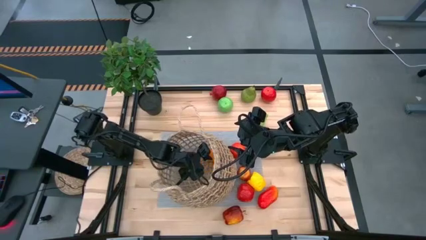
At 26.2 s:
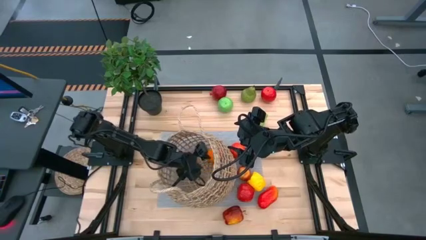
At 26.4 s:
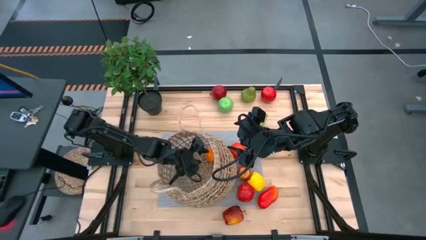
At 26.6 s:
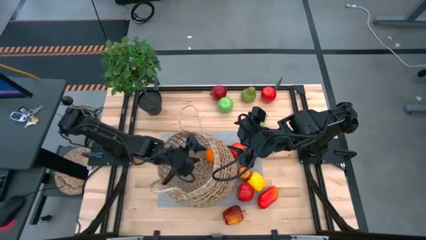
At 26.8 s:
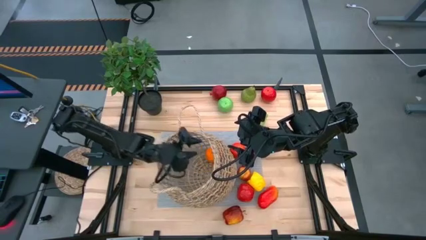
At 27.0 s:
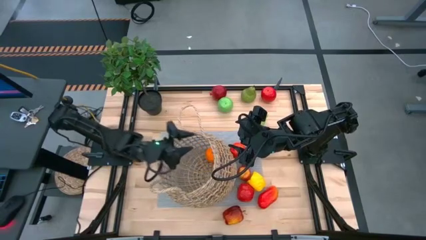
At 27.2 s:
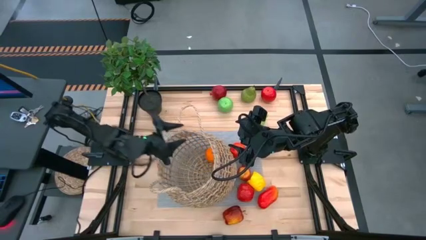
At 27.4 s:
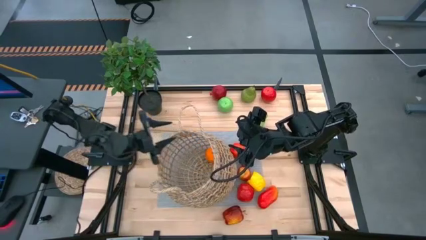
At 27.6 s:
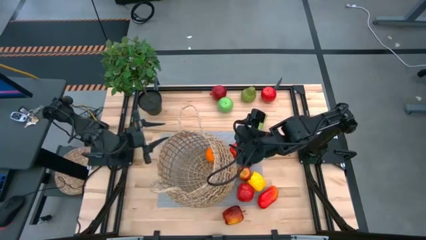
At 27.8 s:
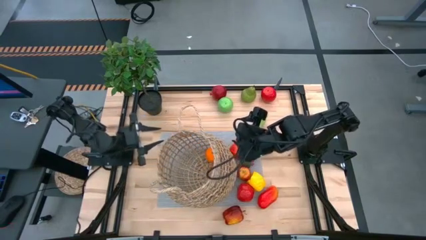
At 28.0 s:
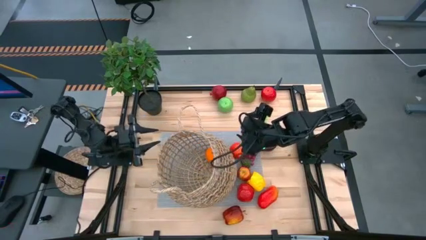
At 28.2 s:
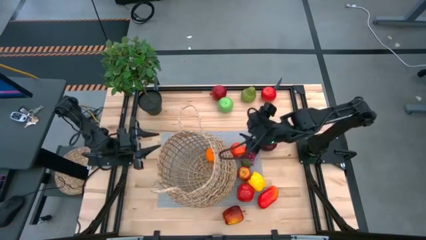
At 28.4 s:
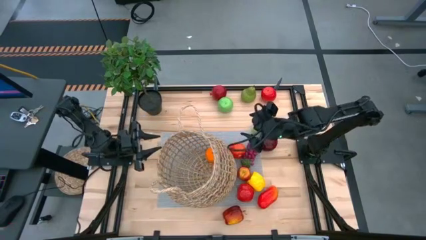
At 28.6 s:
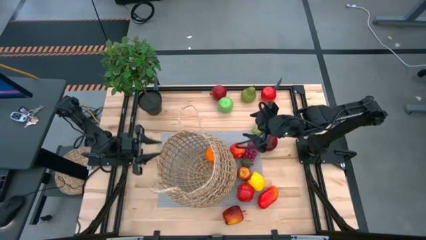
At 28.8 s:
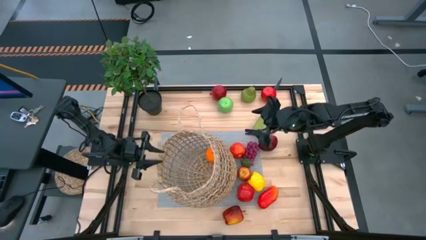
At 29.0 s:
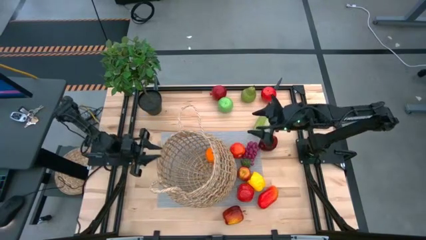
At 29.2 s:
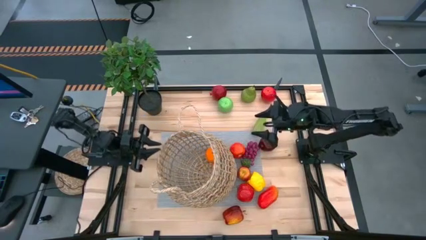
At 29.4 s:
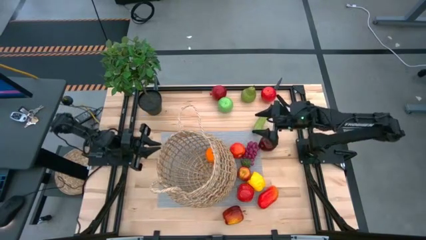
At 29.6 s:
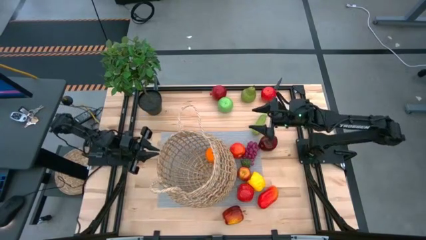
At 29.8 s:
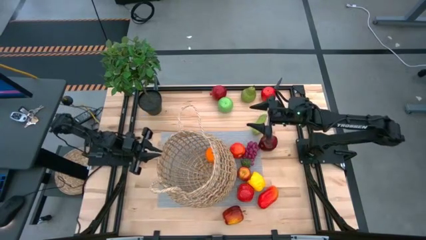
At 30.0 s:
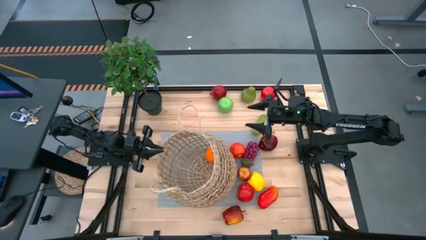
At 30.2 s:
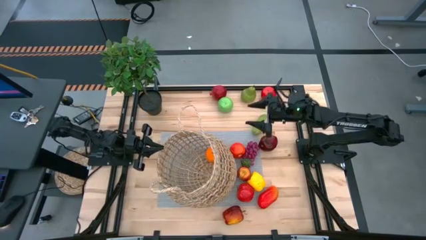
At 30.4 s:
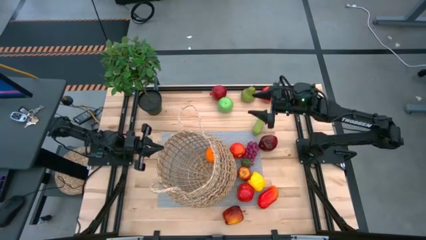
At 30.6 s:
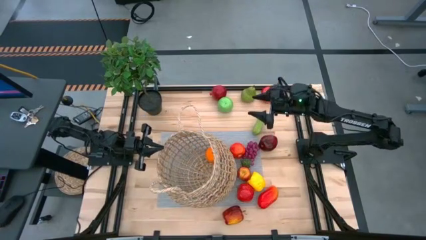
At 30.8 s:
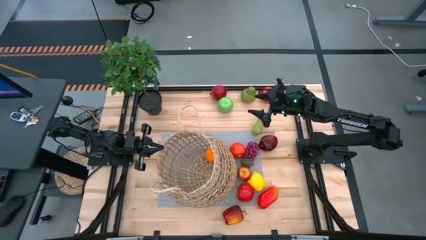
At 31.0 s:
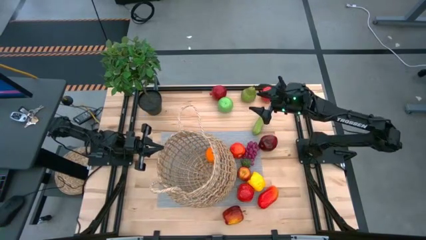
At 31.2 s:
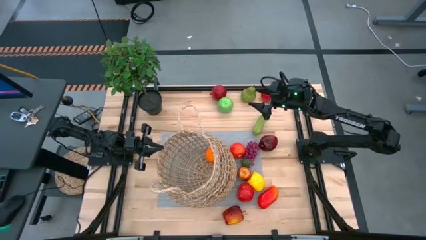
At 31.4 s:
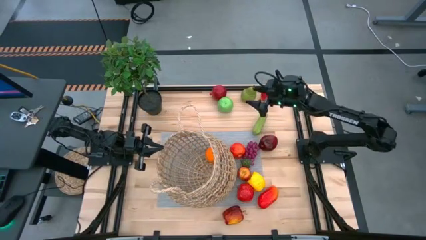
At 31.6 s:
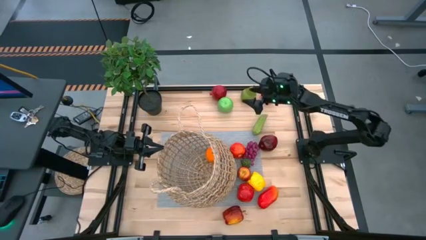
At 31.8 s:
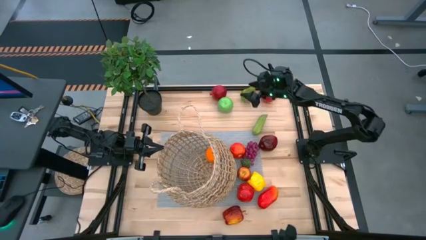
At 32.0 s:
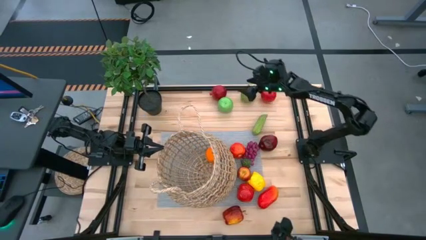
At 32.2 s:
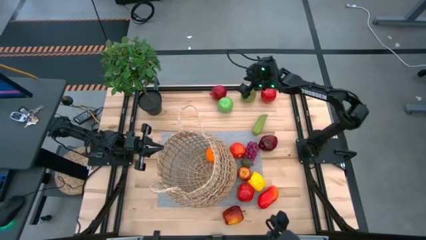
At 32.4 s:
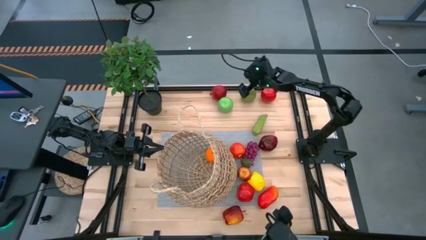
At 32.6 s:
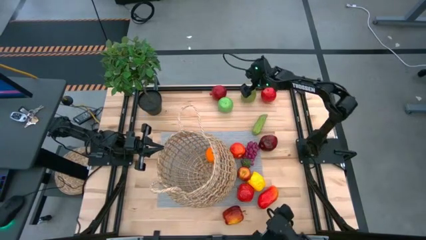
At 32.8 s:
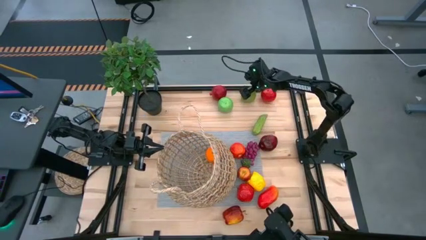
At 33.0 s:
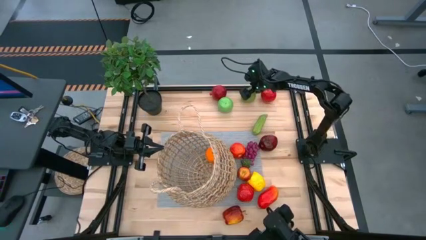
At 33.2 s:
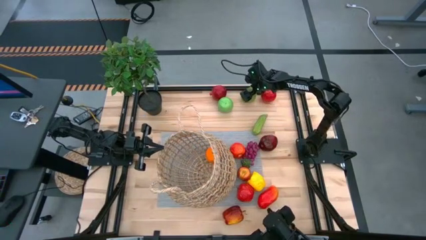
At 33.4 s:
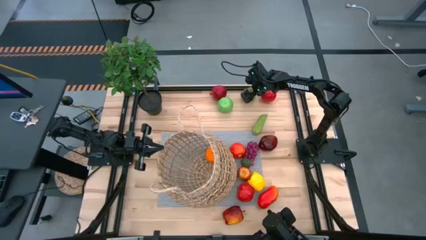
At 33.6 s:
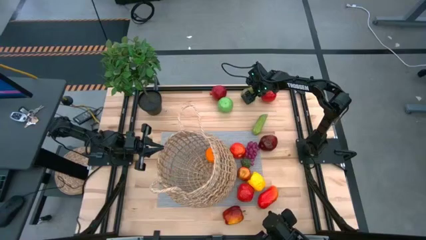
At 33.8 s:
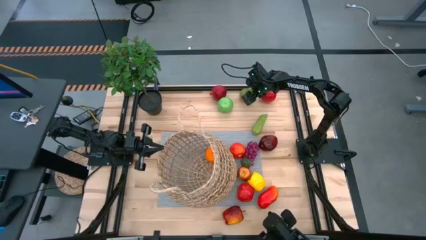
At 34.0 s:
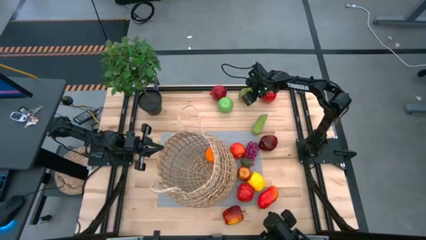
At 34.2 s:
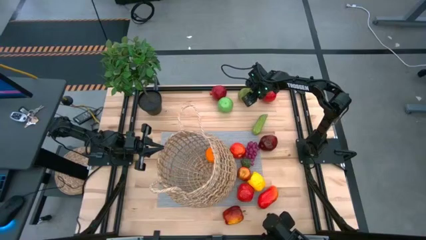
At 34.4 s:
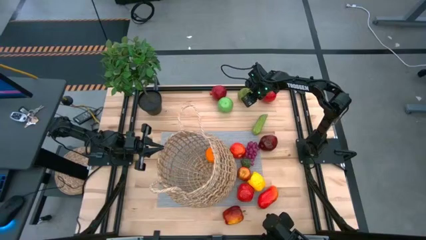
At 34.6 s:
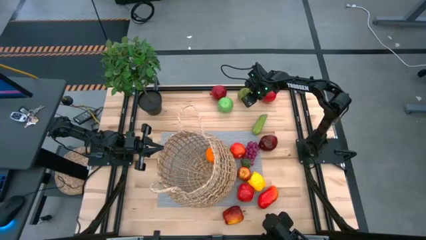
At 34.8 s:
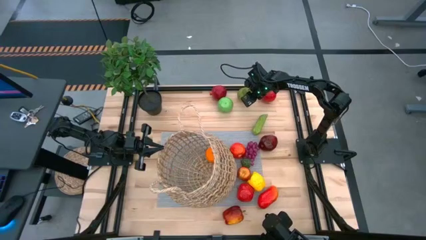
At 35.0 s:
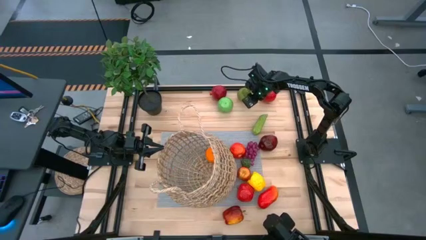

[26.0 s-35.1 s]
Task: Build produce basket
Put the pear into the brown basket

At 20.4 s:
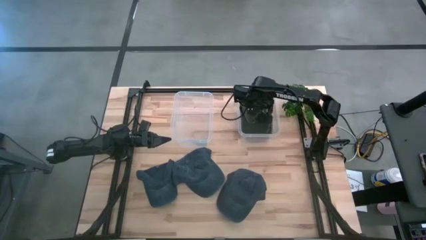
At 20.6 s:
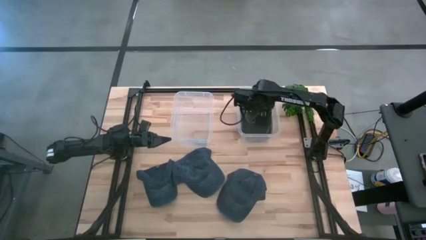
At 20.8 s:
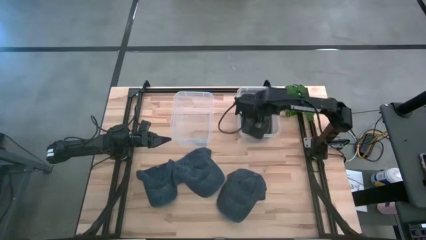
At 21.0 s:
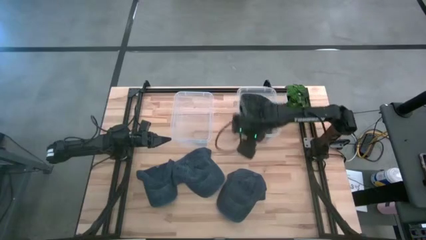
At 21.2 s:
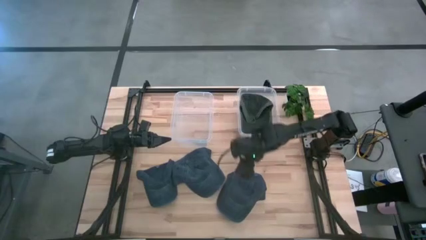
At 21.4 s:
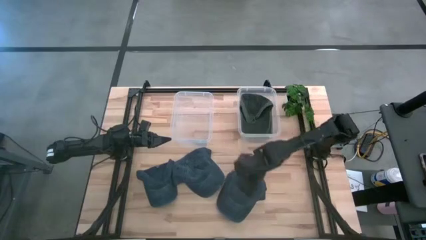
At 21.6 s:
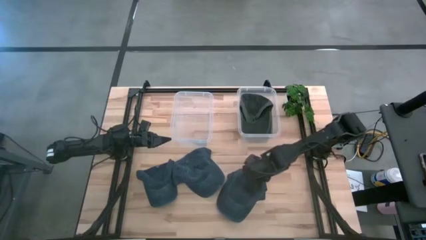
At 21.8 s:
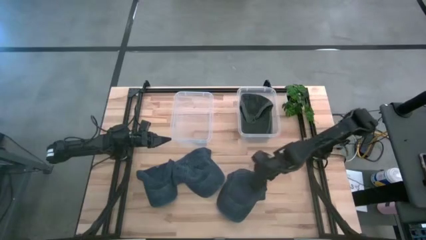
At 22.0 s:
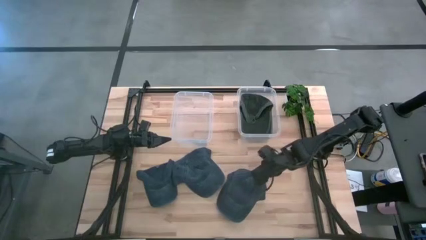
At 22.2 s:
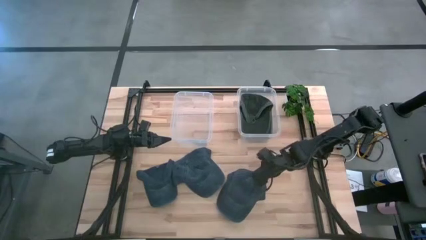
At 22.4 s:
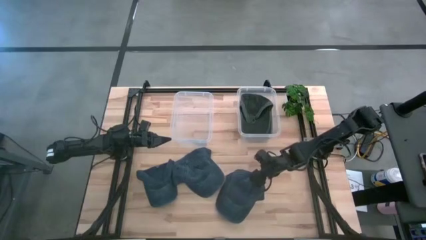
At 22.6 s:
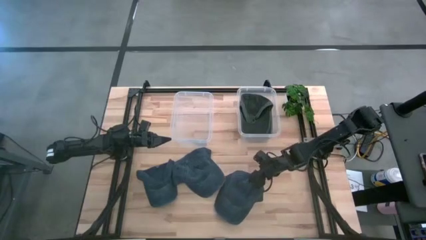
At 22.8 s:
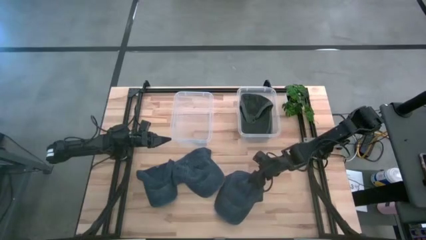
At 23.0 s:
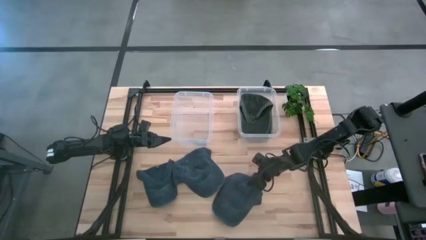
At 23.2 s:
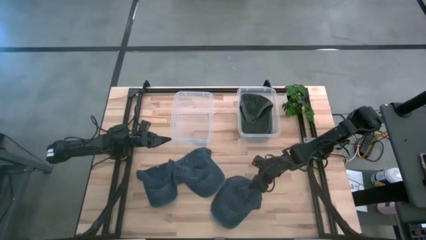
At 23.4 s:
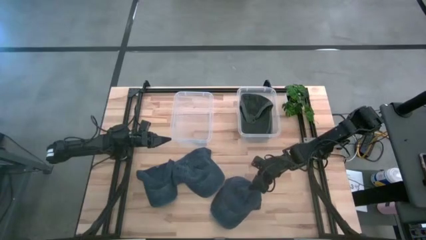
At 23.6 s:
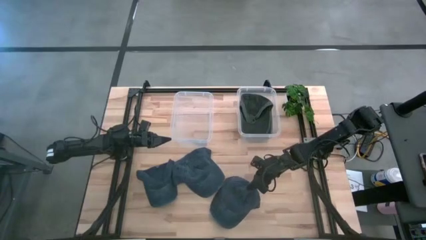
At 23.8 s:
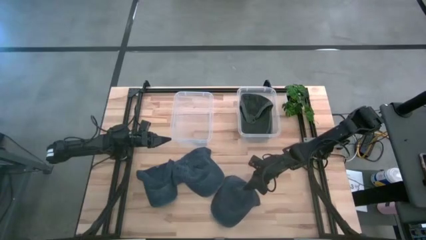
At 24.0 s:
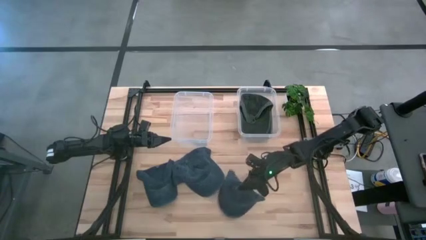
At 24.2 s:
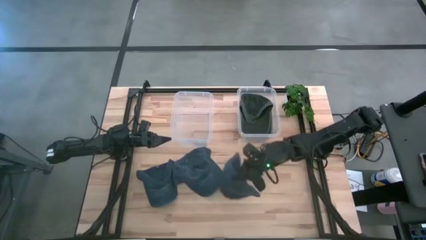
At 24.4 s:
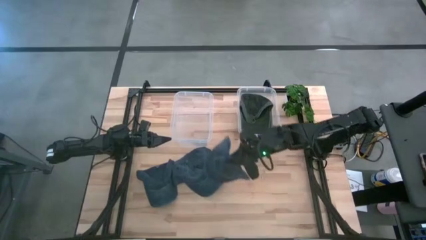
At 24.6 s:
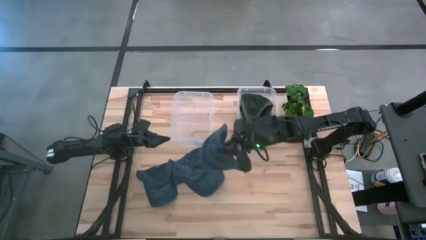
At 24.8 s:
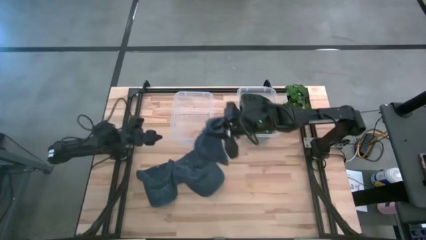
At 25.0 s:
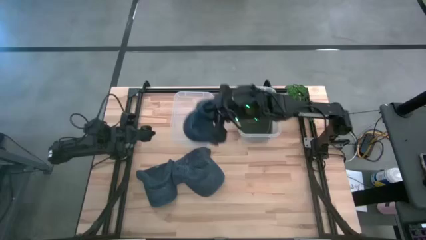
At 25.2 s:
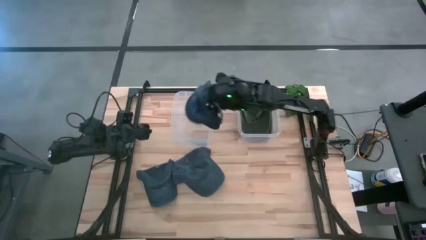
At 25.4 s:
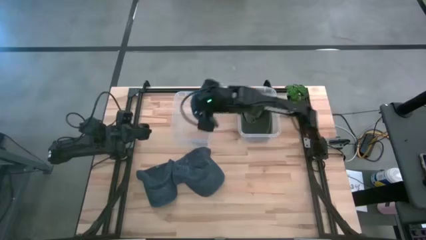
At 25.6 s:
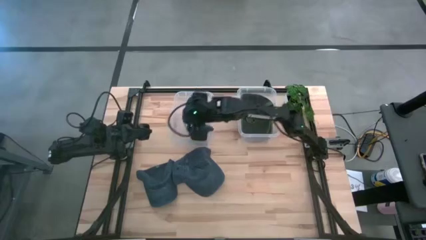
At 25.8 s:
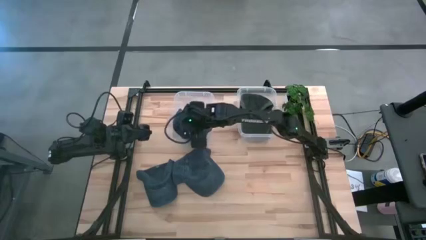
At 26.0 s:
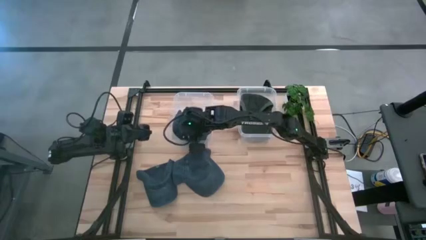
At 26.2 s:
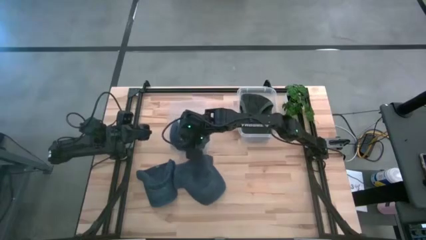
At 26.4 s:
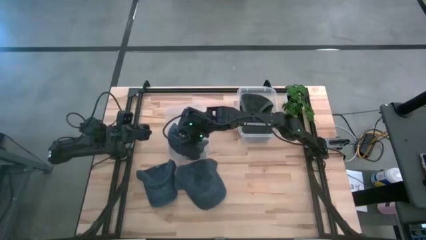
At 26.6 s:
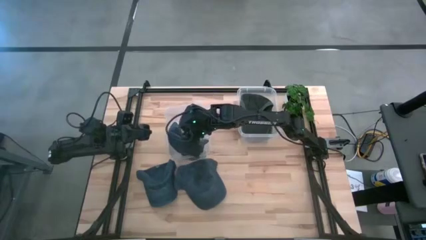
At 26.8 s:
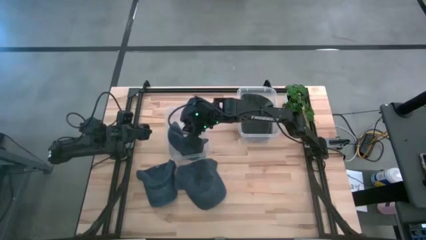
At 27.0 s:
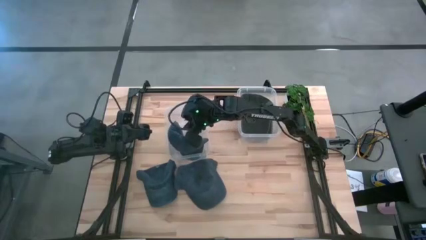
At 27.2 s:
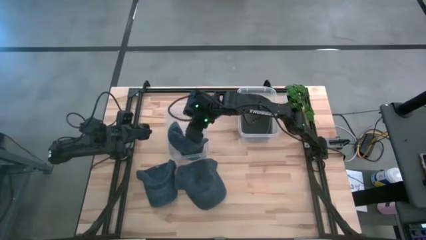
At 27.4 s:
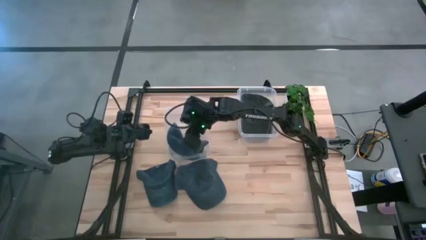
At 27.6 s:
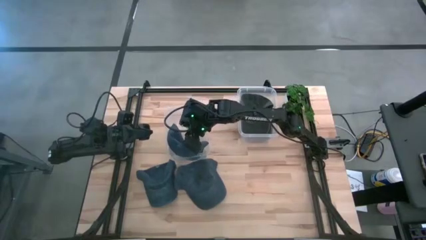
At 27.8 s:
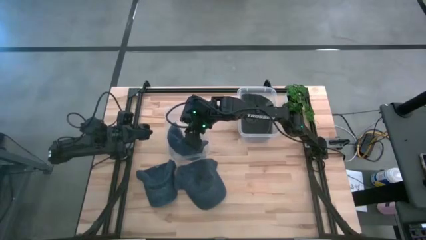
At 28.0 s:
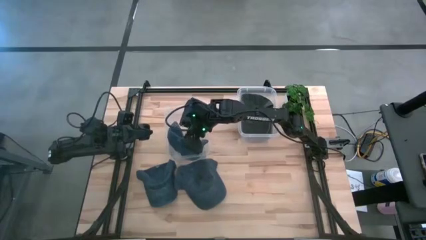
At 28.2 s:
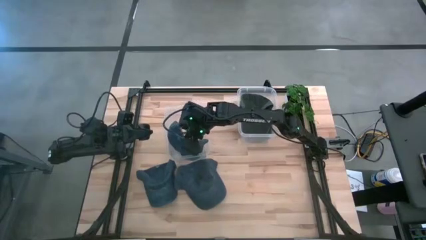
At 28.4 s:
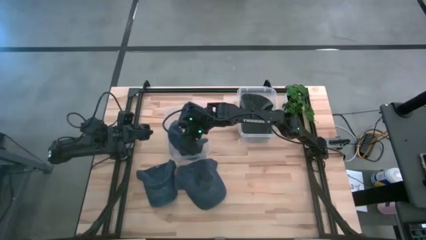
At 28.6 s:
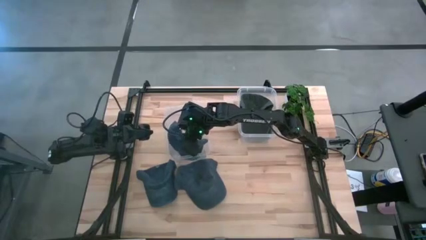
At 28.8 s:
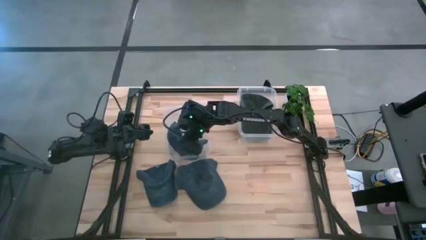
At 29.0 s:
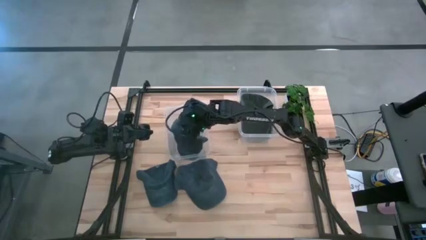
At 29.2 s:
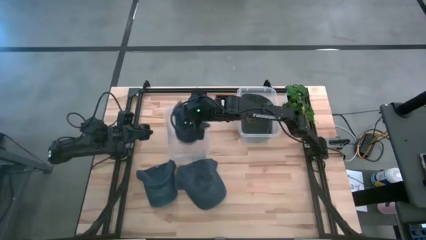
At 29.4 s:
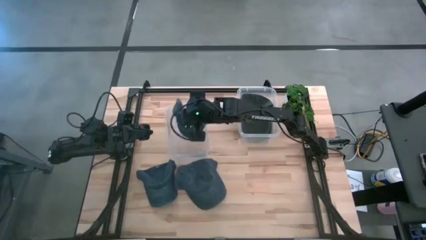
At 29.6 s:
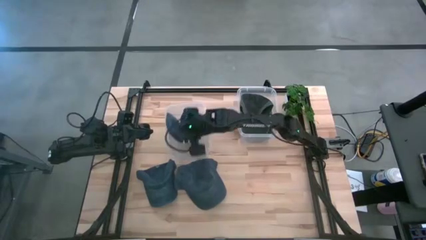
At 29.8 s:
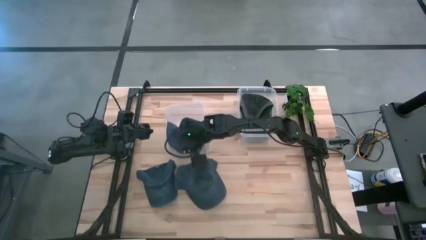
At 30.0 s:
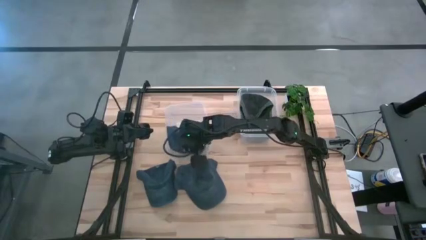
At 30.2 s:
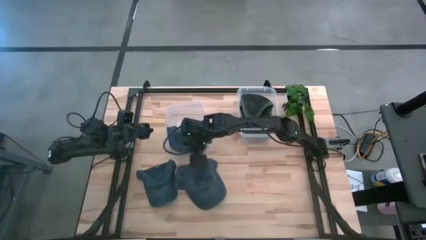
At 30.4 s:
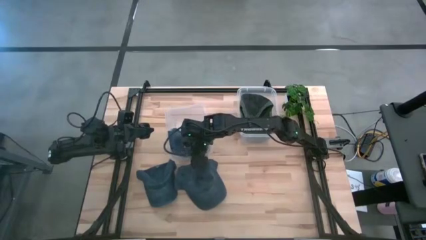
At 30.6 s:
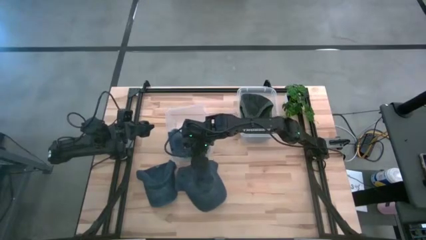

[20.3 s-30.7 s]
Task: Pick & Place hat
Put the right blue cap into the left transparent bin
